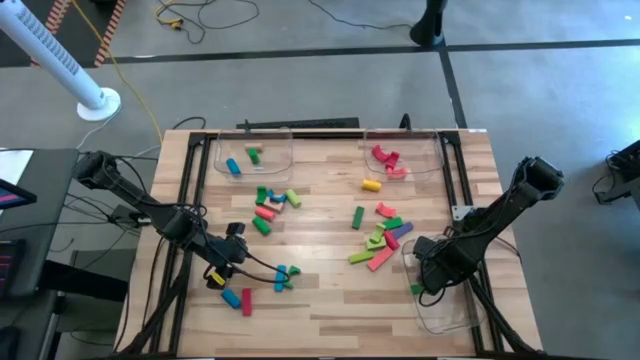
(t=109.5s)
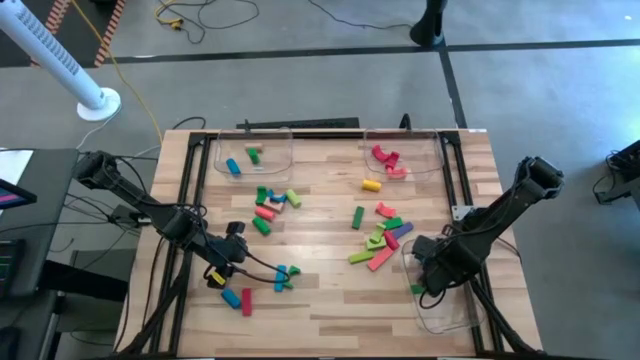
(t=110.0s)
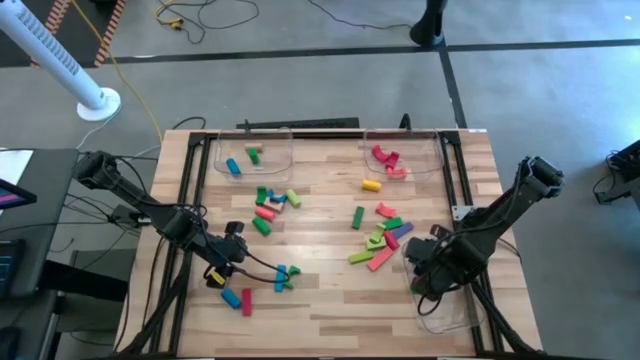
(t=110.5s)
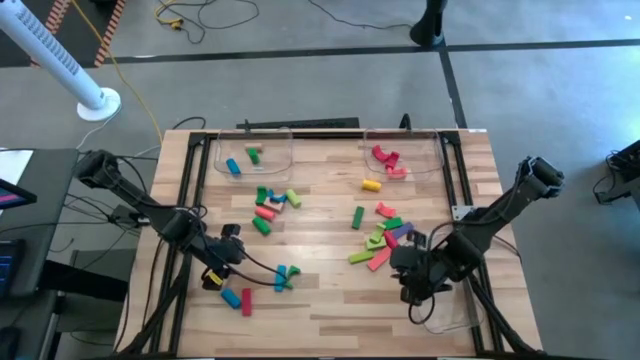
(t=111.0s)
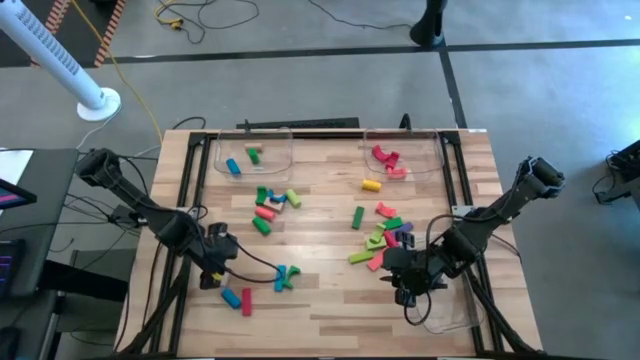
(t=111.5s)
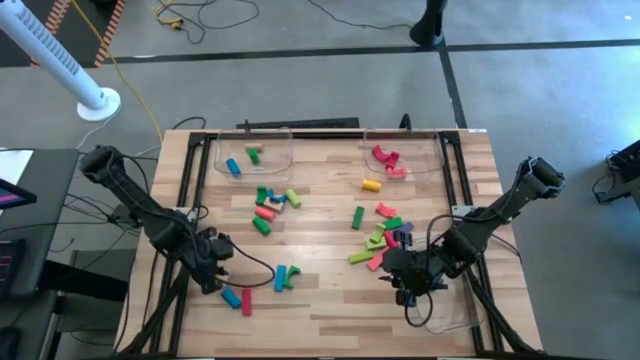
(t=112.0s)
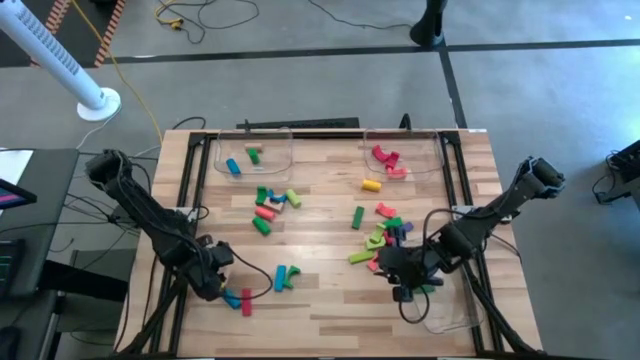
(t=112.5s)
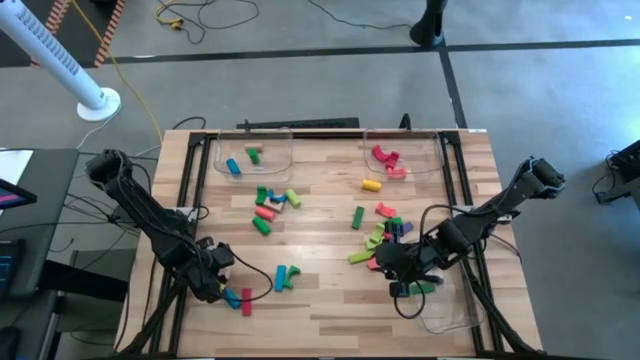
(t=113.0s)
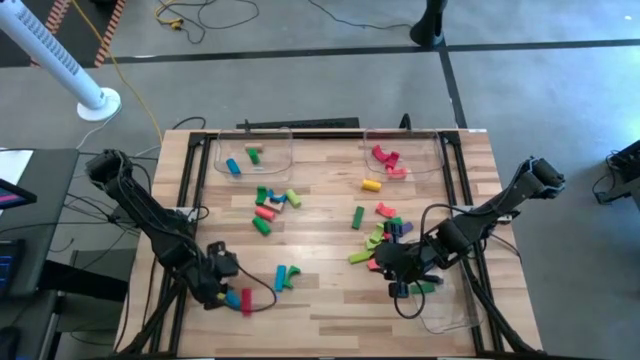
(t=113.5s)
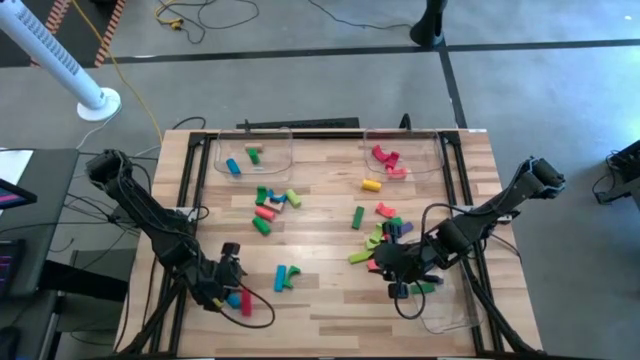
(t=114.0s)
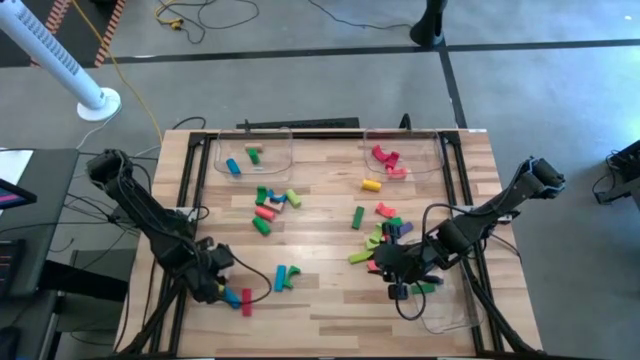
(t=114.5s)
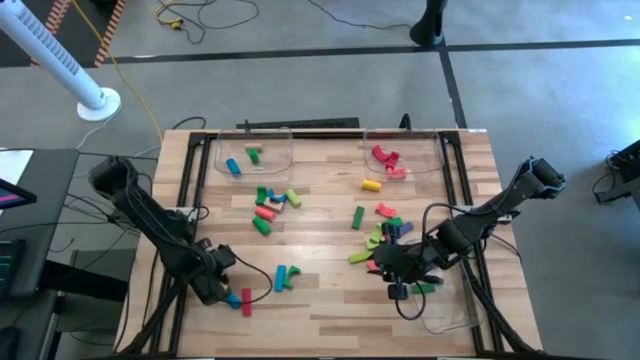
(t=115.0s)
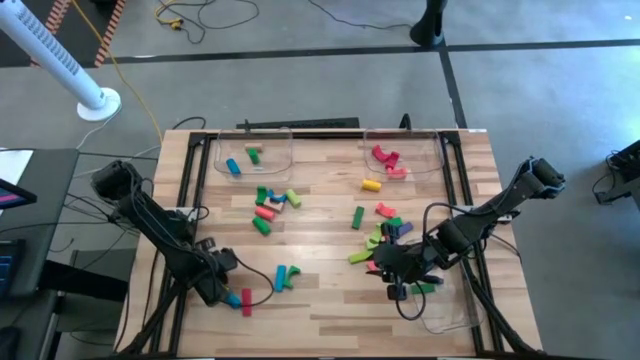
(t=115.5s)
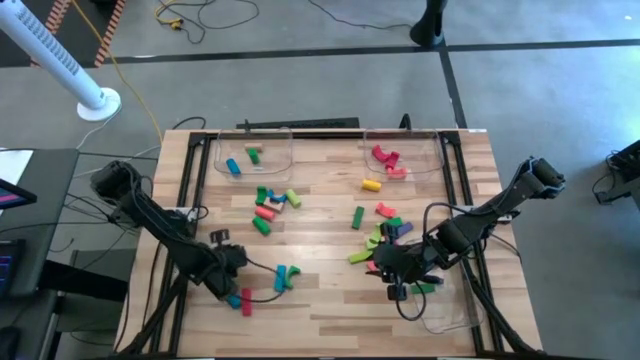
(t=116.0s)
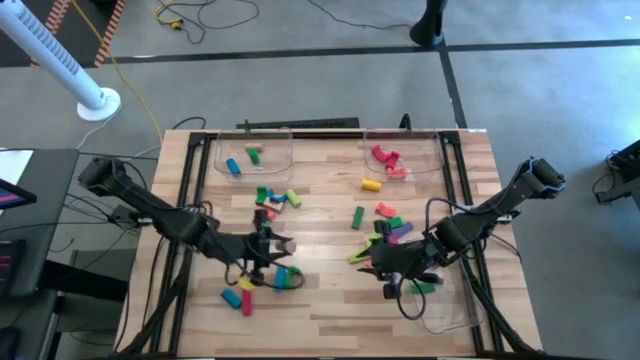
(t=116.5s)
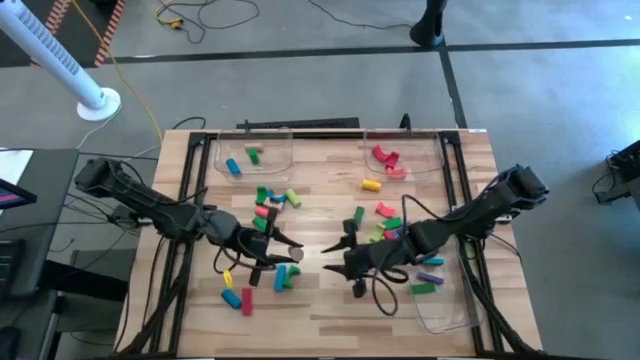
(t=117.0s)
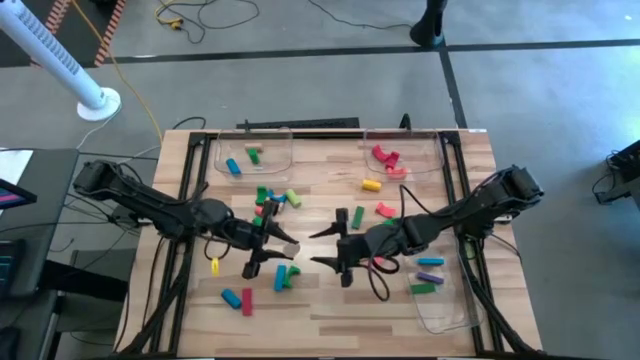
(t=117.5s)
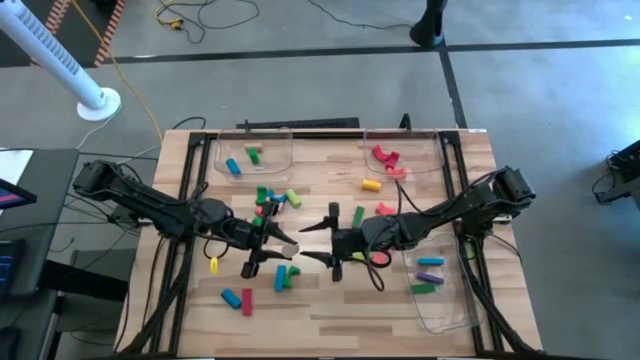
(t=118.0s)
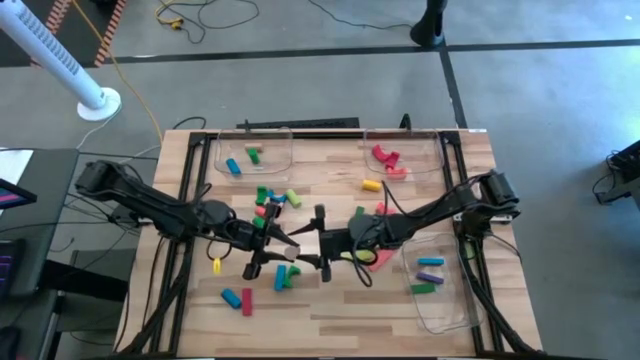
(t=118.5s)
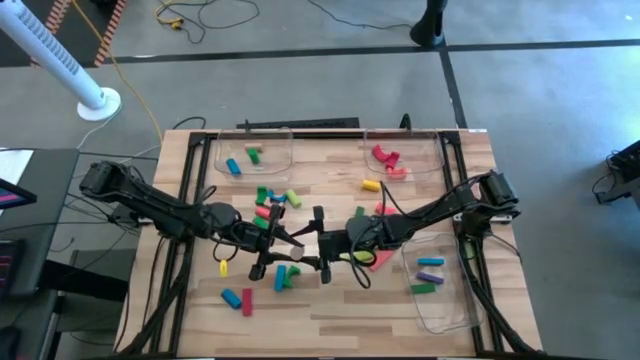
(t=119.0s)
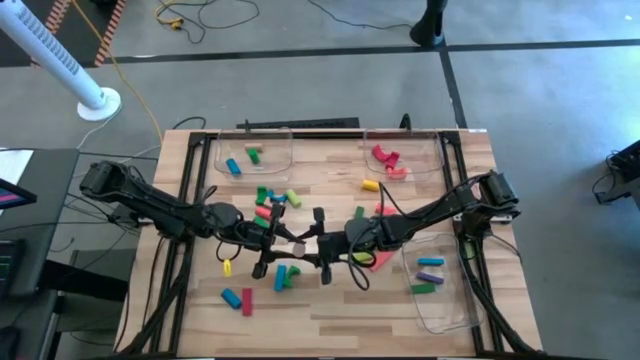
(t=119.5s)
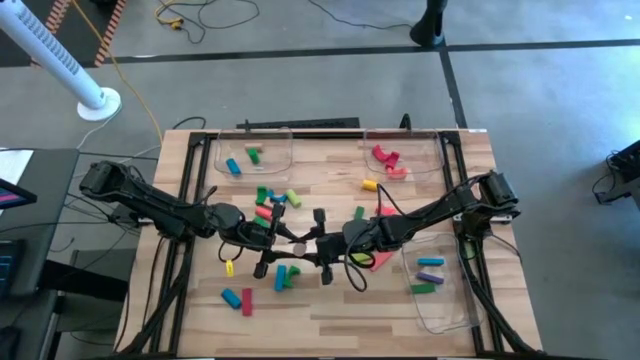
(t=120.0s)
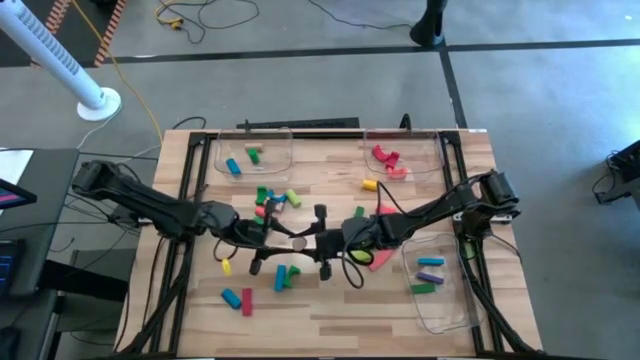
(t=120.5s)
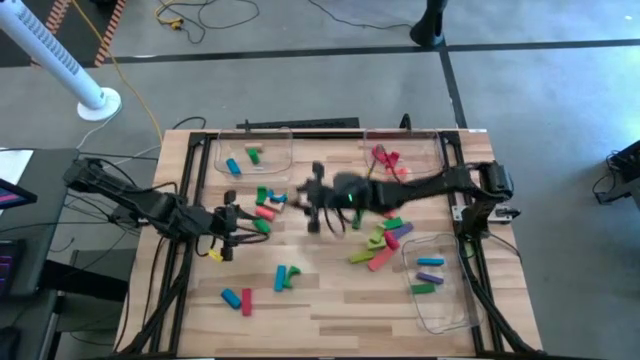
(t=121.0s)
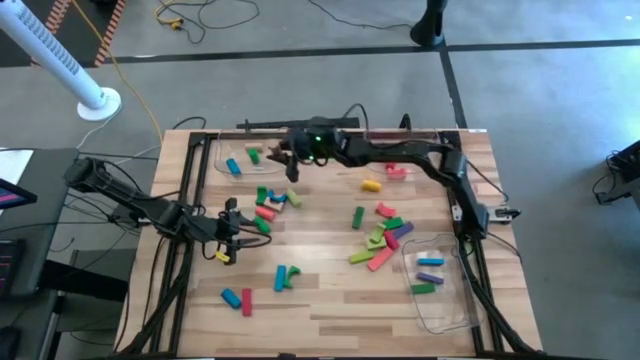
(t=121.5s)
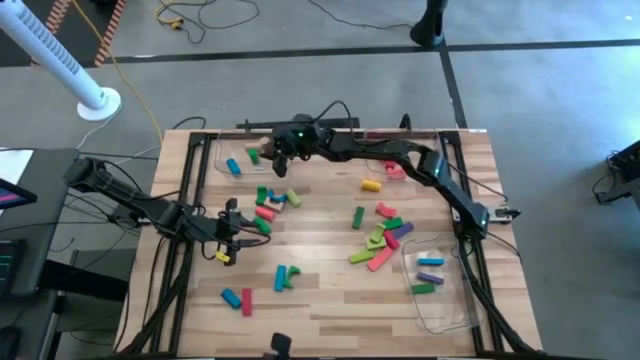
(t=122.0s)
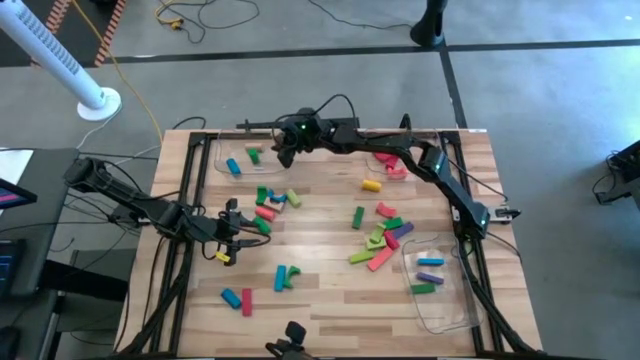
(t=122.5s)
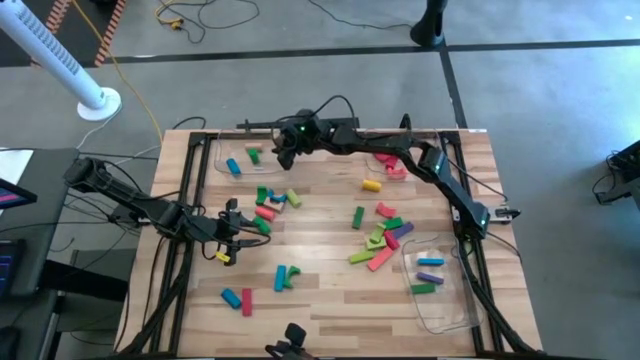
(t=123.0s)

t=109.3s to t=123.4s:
Task: Sort blocks by size
Put the brown cylindrical block into the top left transparent bin

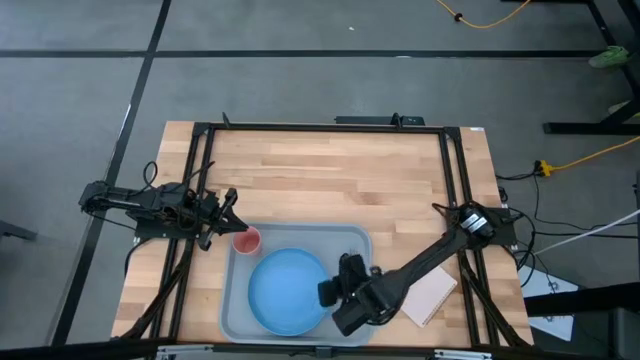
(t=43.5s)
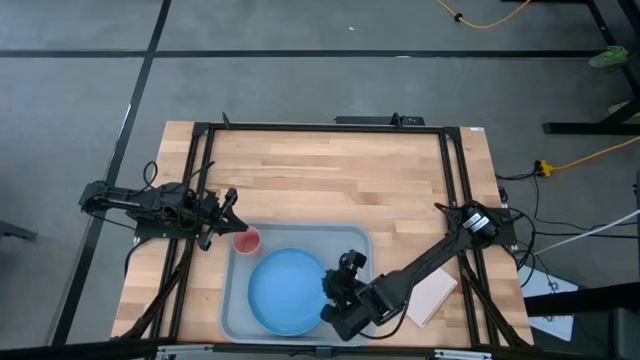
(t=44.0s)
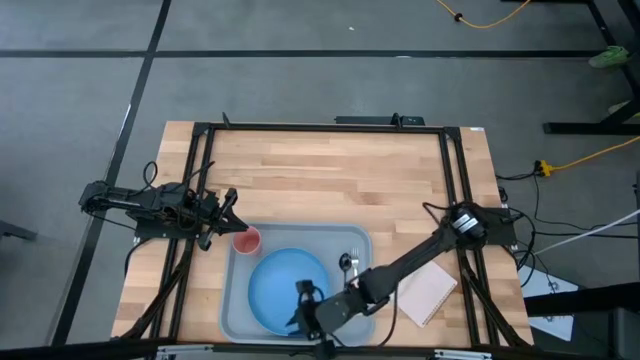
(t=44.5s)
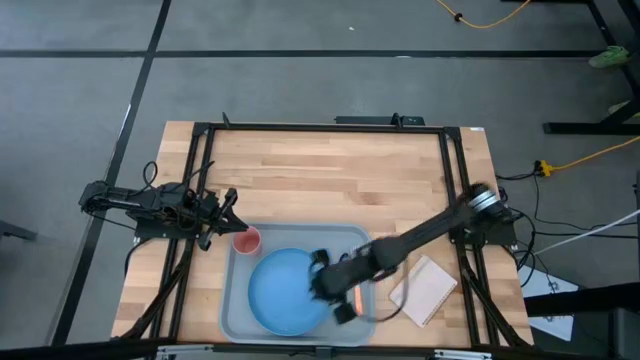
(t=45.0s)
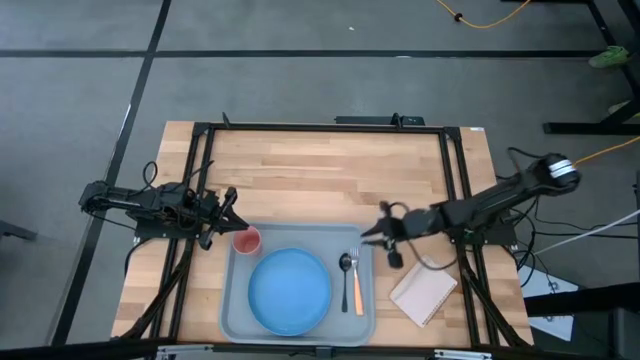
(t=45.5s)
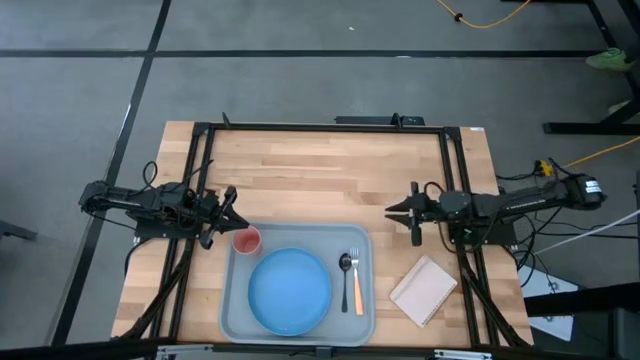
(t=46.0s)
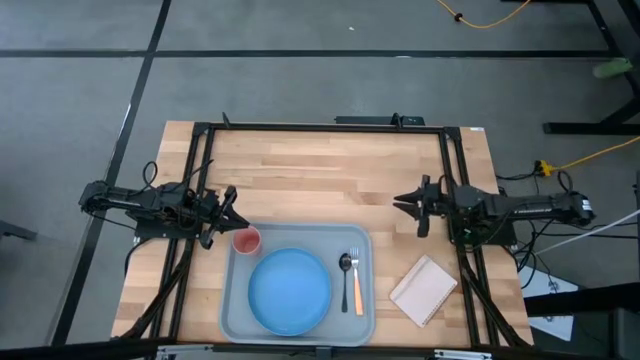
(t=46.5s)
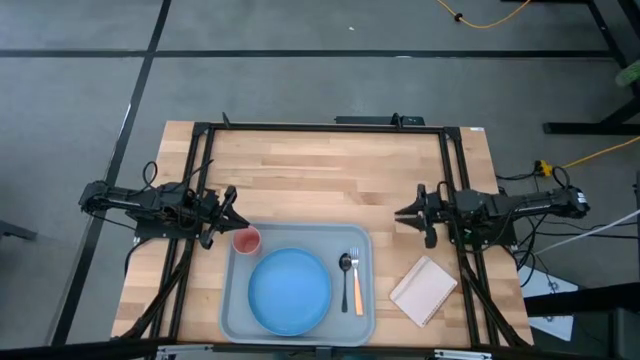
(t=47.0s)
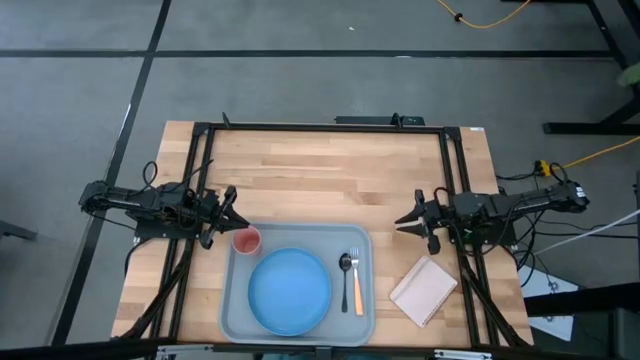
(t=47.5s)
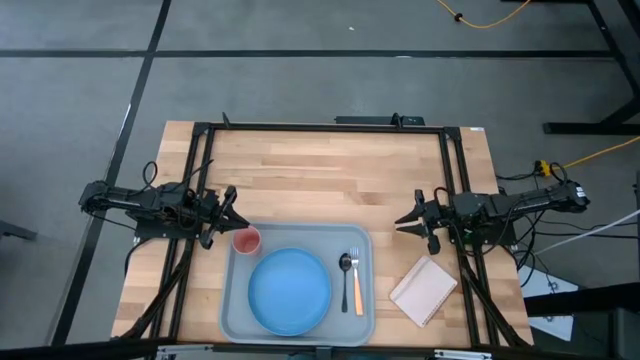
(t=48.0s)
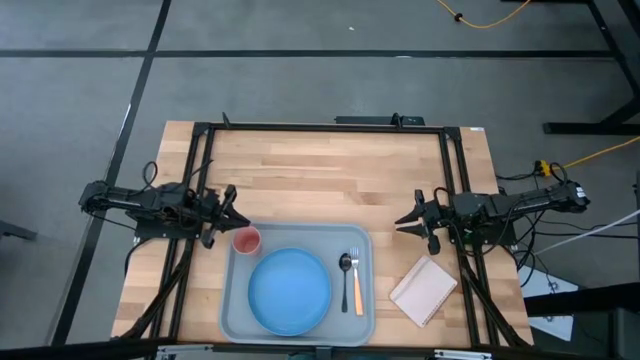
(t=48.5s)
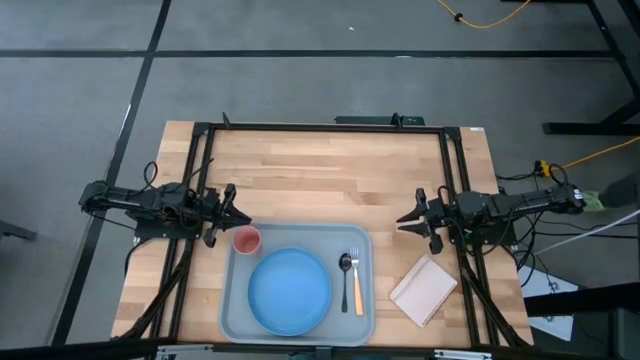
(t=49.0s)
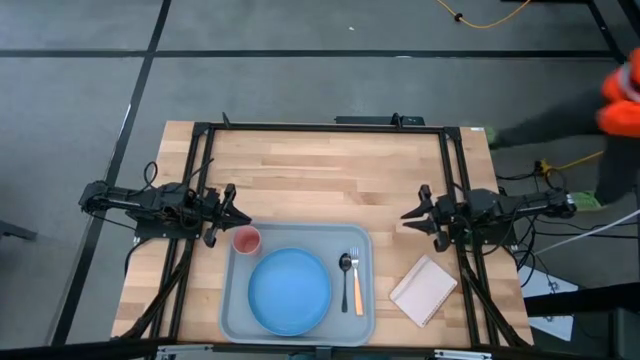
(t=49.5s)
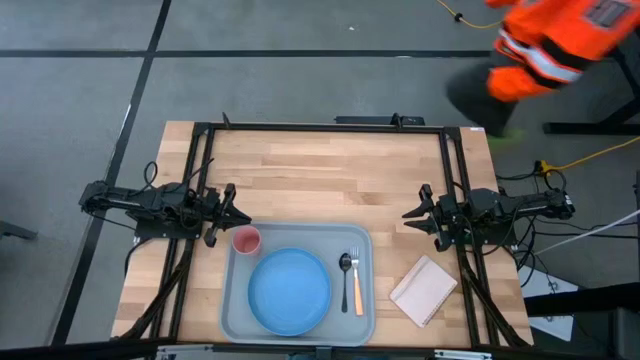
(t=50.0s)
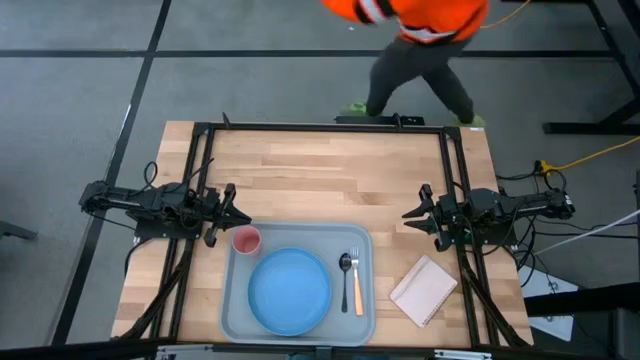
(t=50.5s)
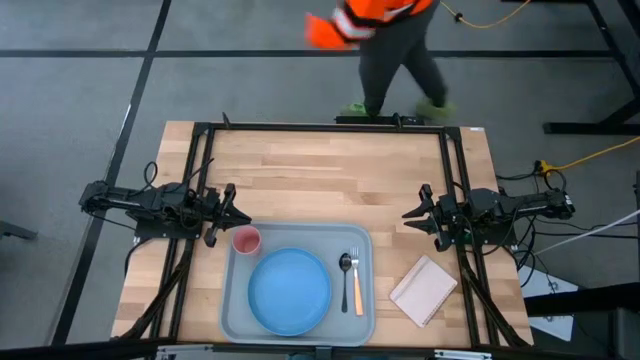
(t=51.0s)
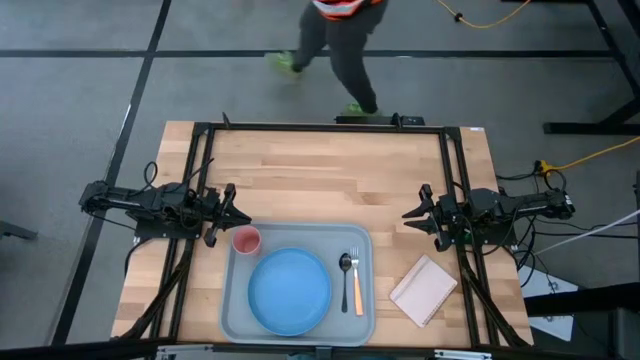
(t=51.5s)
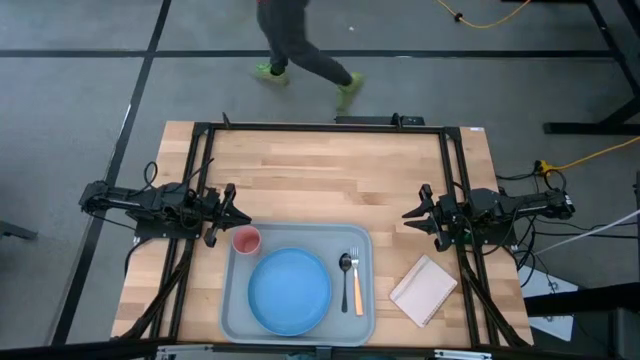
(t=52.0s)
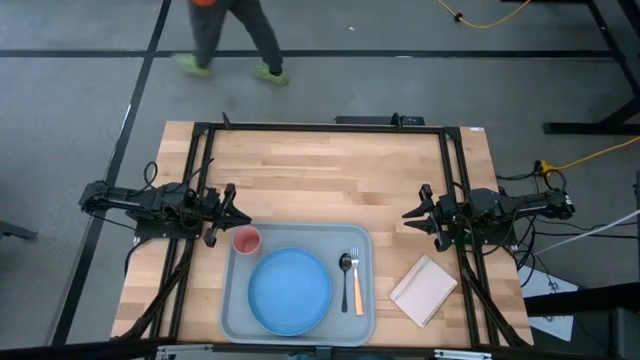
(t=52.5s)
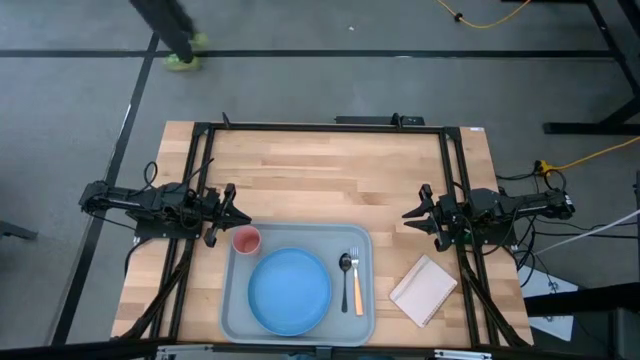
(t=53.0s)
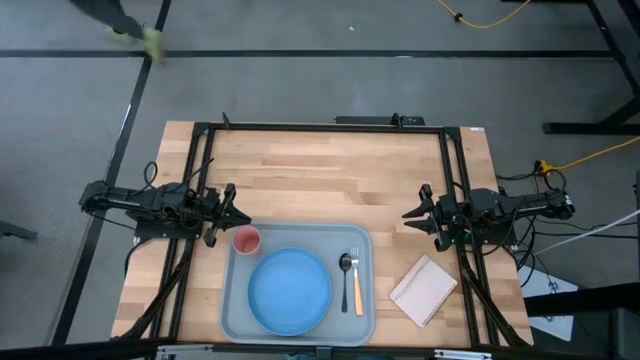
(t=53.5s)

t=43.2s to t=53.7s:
Task: Pick and place plate/cup/fork/spoon on tray
Return to Home Position
